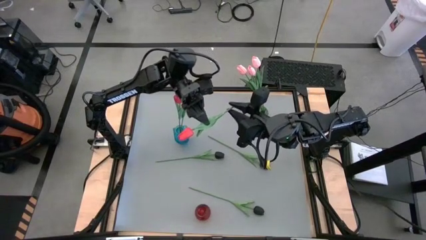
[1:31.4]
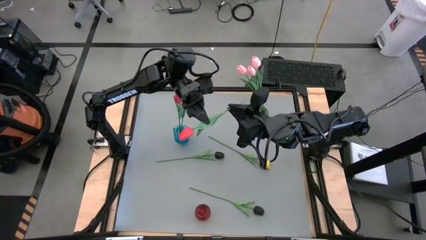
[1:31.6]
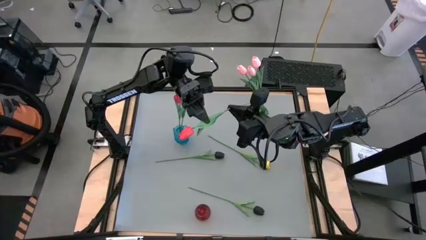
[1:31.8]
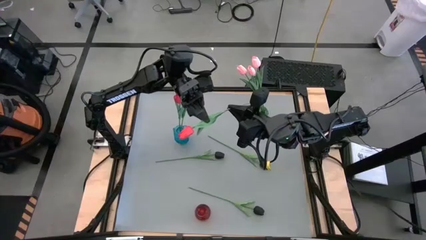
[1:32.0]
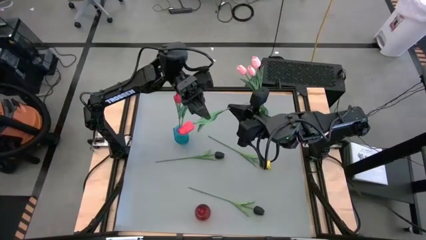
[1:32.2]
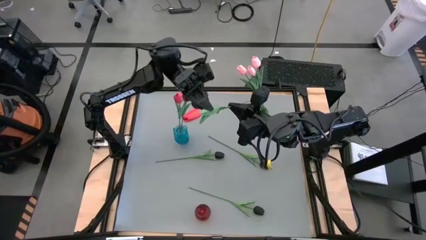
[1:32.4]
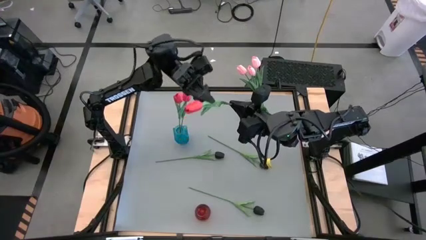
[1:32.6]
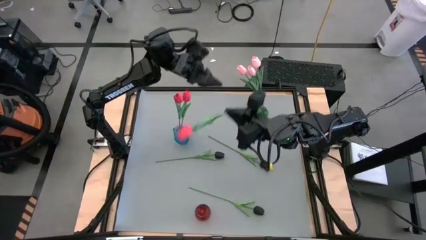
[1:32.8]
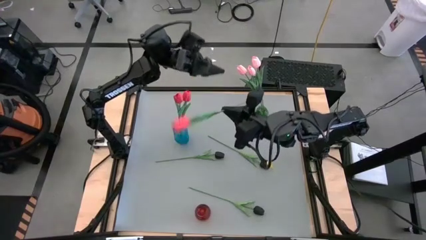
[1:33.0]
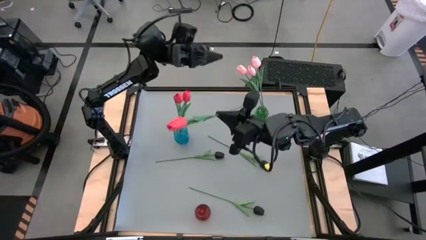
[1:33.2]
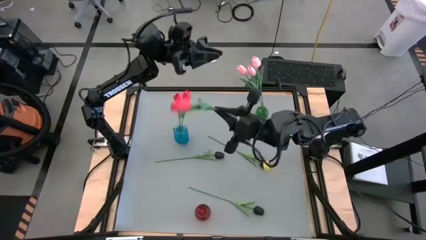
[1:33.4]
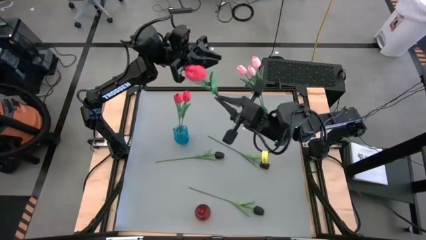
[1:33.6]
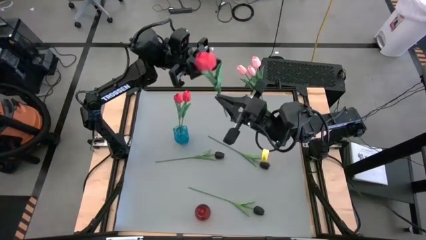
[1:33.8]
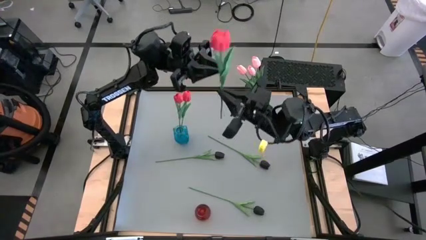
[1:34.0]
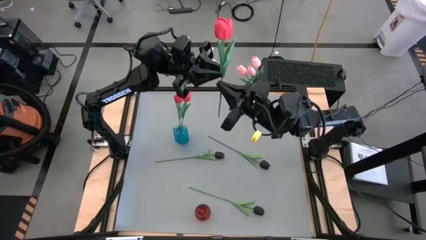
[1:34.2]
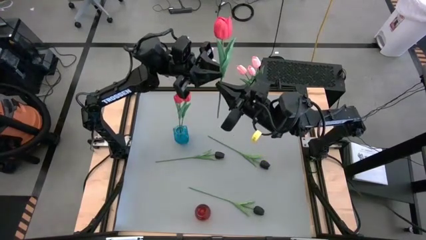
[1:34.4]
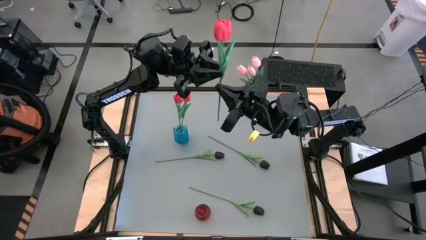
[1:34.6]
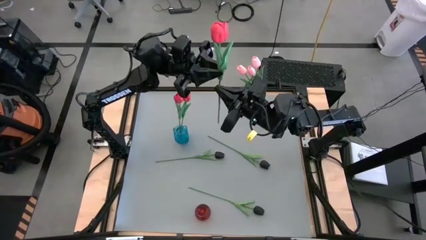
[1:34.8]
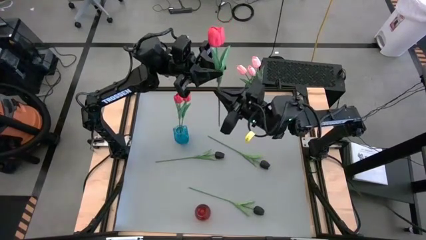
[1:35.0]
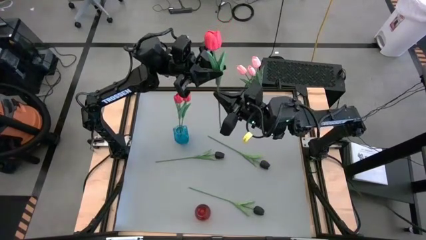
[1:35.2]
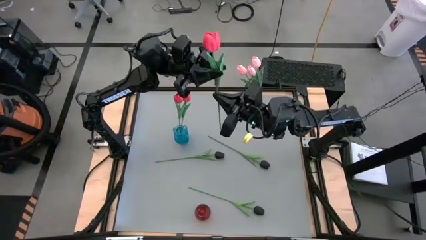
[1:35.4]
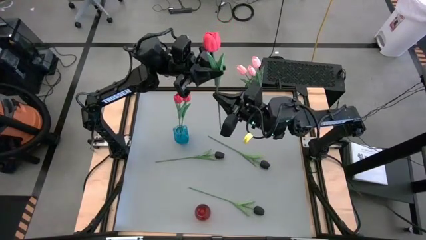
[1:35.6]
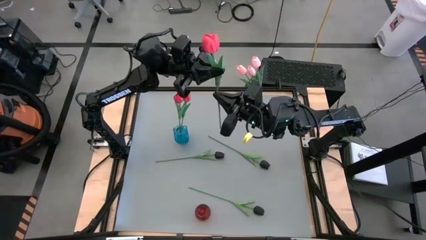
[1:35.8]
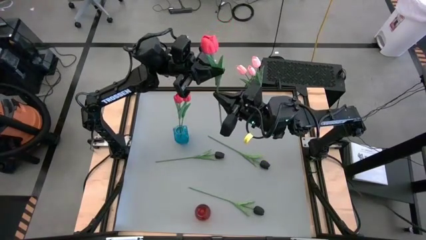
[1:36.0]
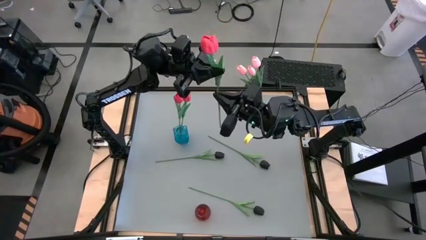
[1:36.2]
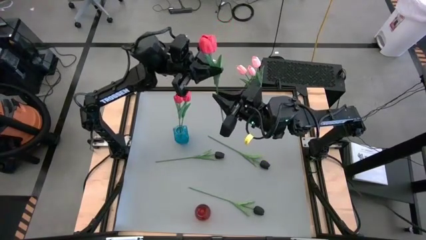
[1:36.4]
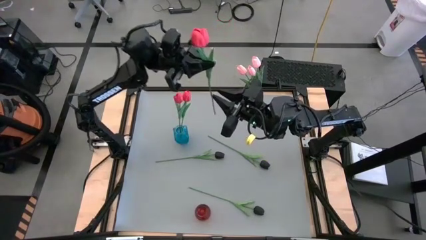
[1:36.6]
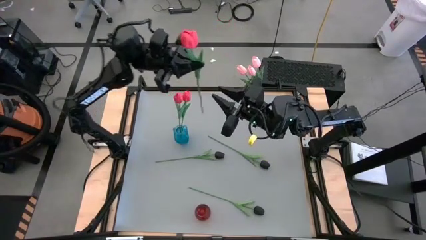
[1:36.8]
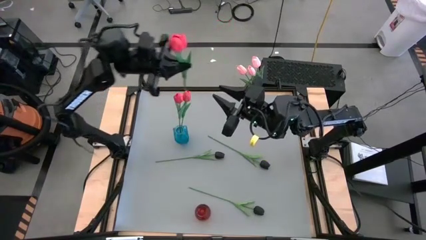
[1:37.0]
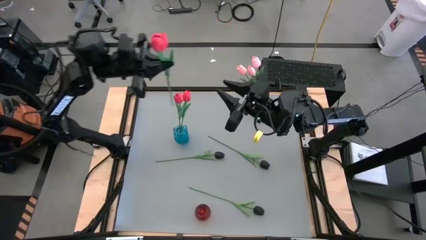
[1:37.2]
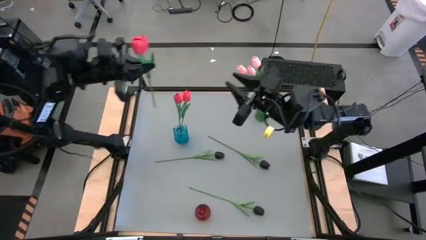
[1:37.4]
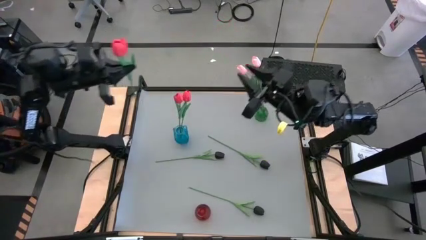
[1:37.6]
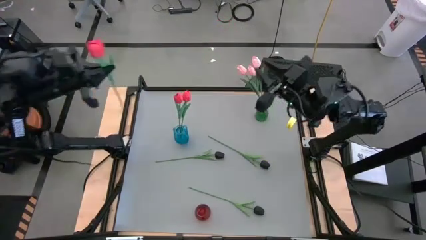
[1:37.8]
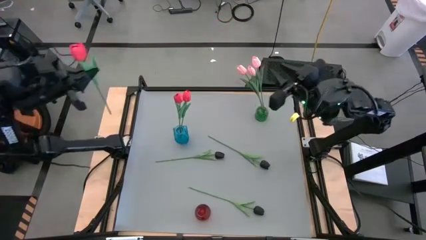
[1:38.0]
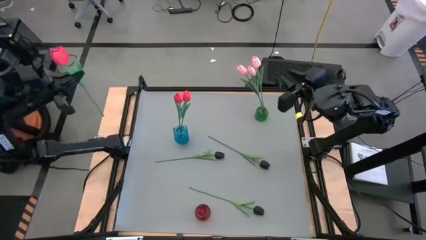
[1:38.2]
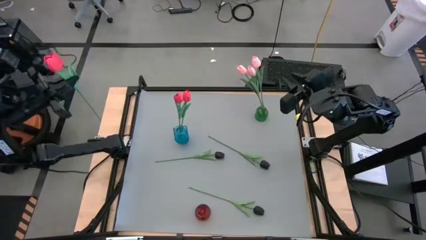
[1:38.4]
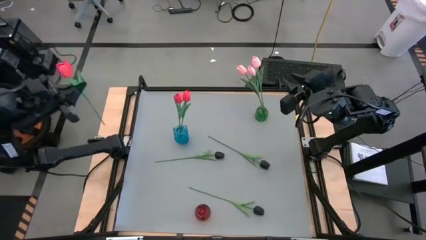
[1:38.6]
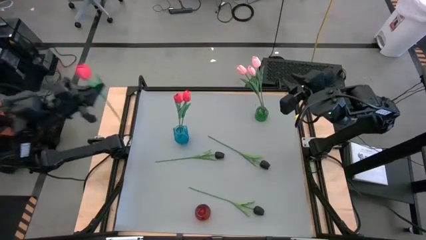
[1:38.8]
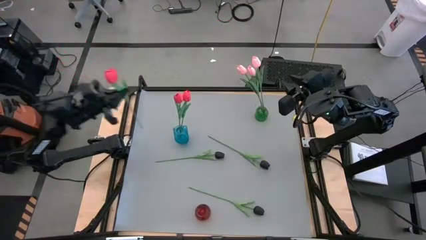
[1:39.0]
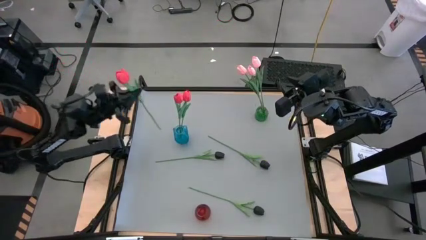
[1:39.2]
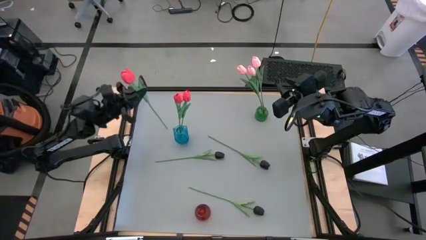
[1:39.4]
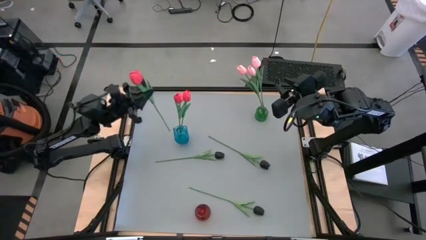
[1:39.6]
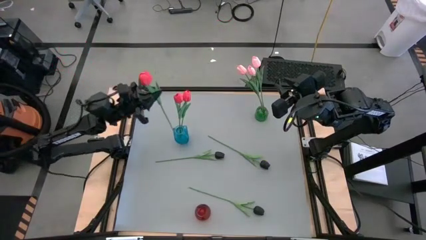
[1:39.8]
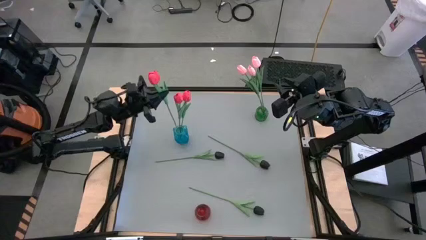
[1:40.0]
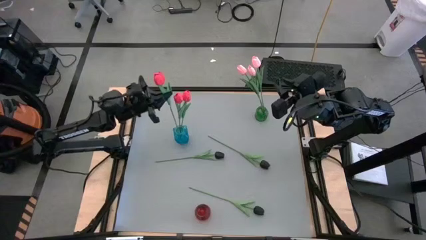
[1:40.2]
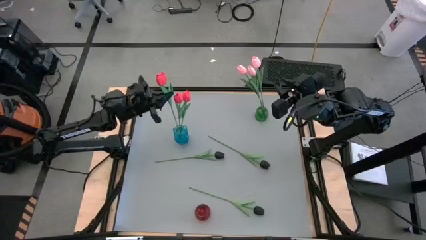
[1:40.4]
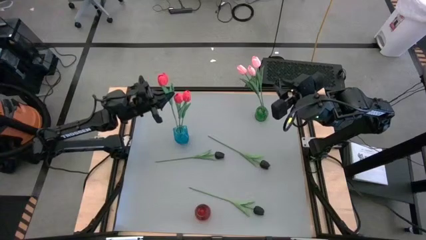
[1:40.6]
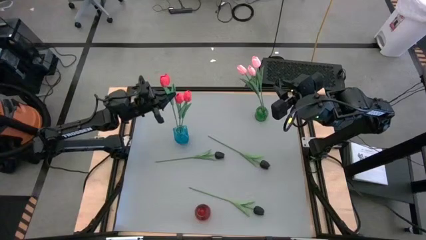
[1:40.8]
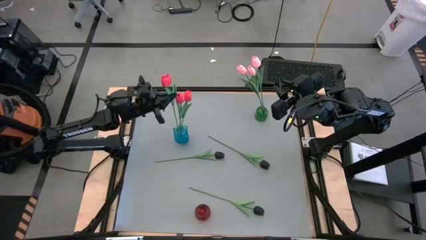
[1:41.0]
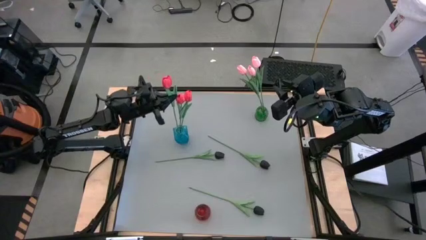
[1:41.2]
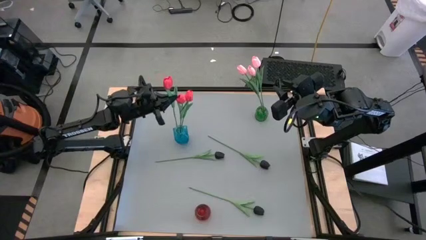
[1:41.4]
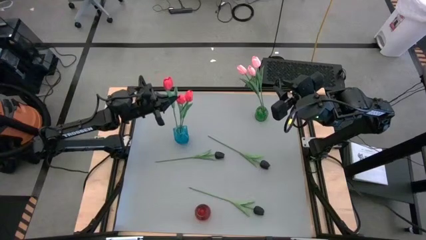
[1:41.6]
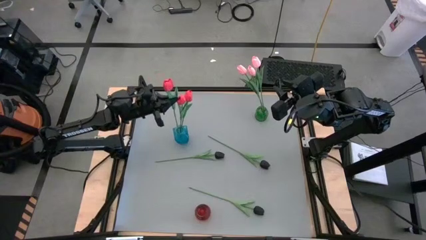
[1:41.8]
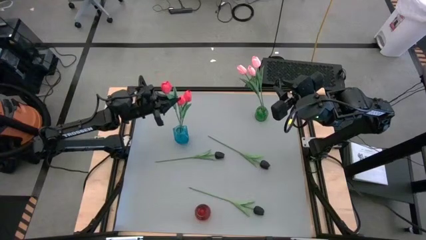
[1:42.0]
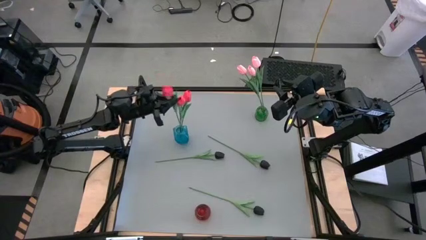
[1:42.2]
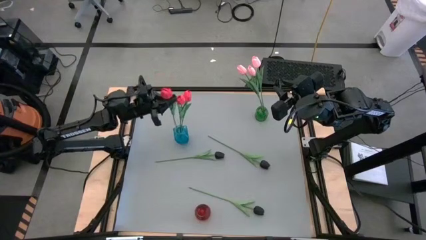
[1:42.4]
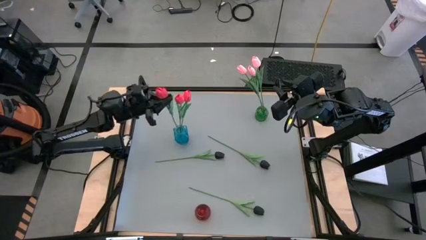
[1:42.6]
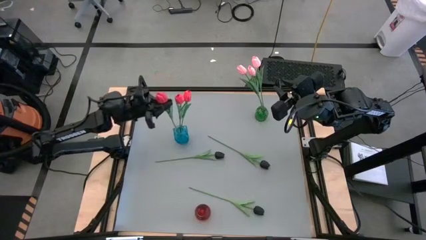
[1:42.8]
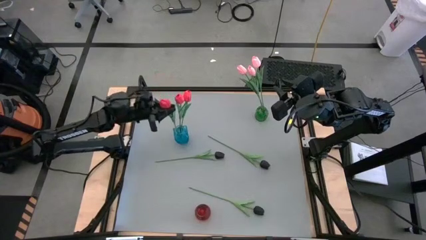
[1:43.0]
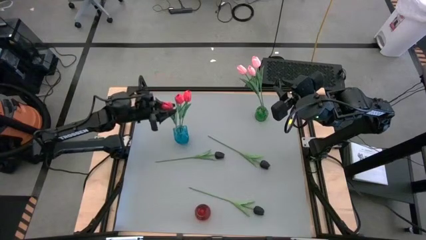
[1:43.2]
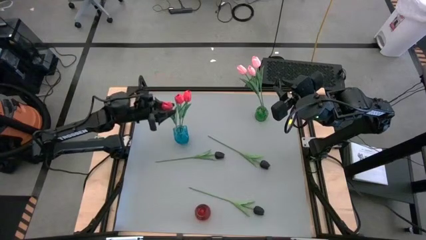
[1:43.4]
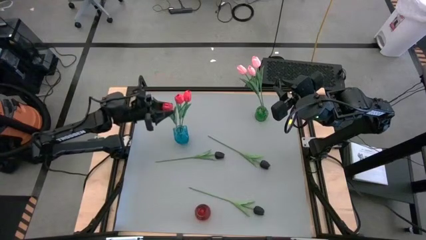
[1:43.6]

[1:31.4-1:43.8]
Task: Sort flowers into vase by color
Put the red flower into the blue vase

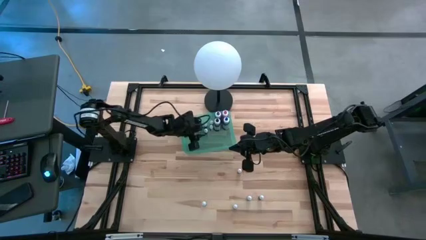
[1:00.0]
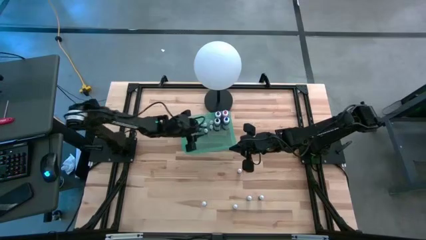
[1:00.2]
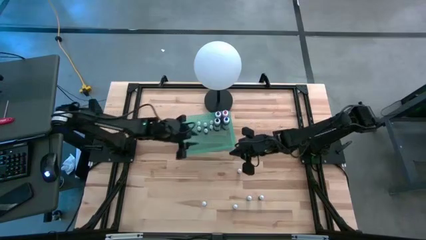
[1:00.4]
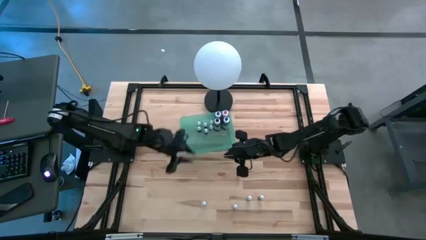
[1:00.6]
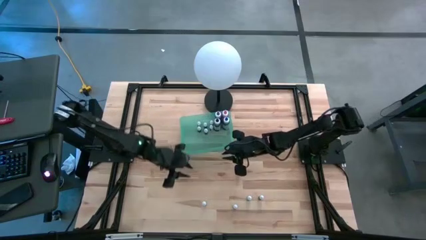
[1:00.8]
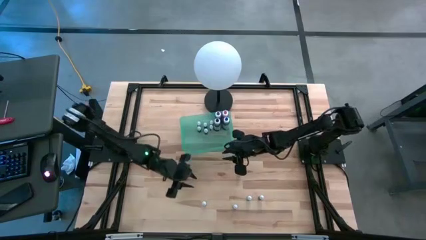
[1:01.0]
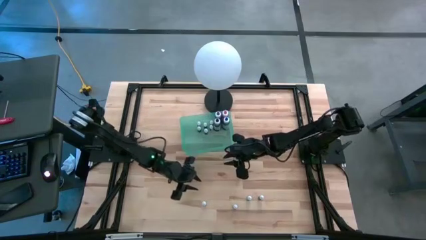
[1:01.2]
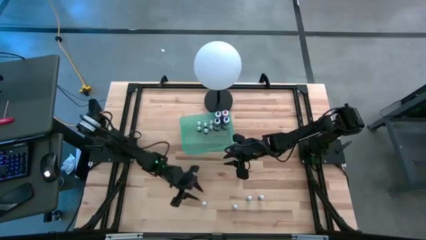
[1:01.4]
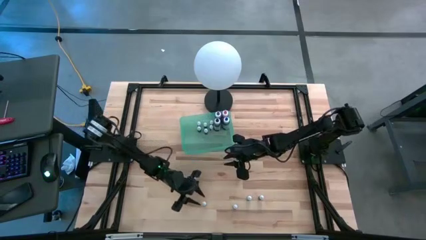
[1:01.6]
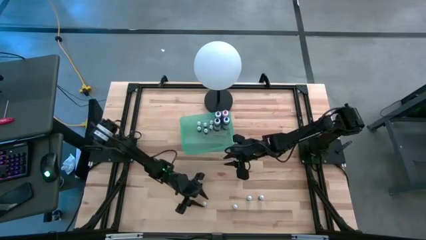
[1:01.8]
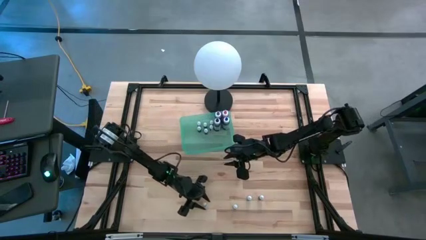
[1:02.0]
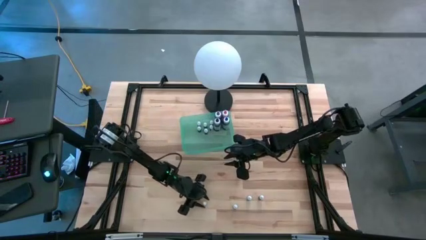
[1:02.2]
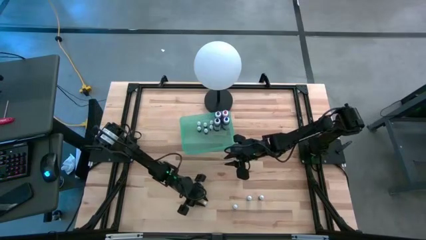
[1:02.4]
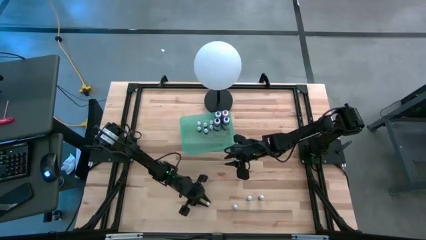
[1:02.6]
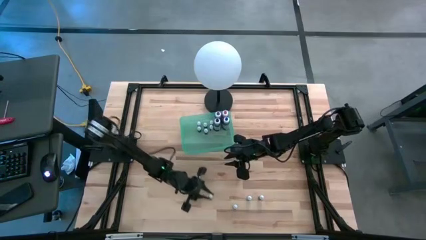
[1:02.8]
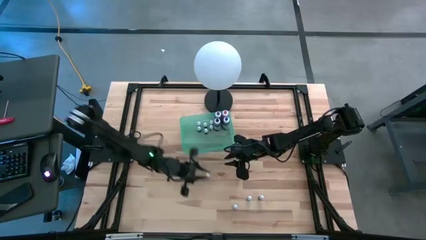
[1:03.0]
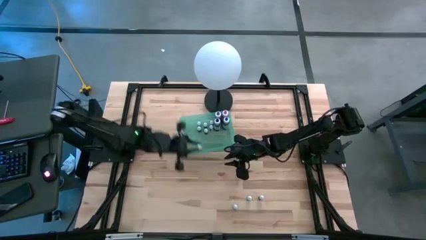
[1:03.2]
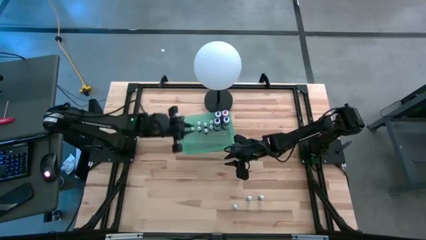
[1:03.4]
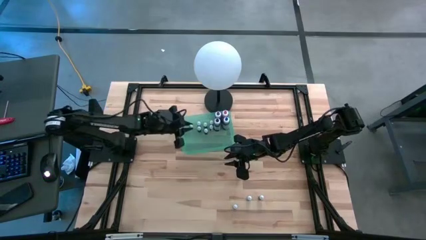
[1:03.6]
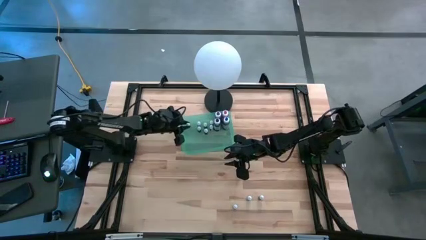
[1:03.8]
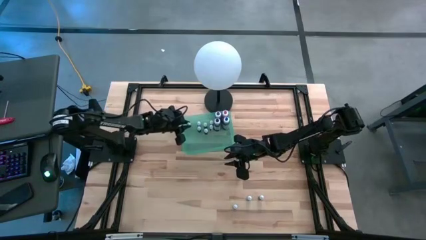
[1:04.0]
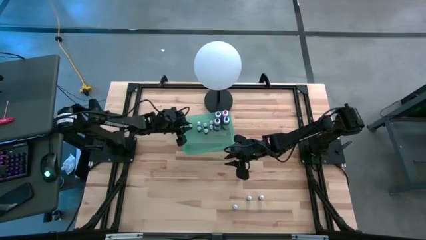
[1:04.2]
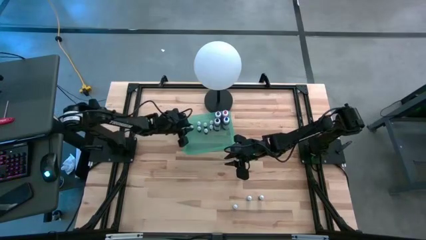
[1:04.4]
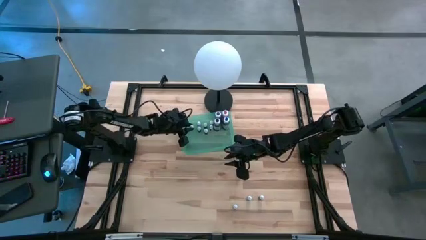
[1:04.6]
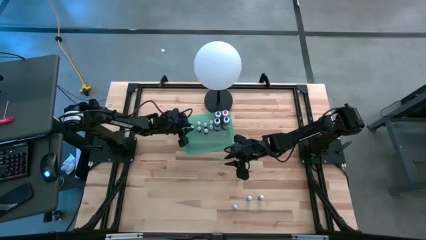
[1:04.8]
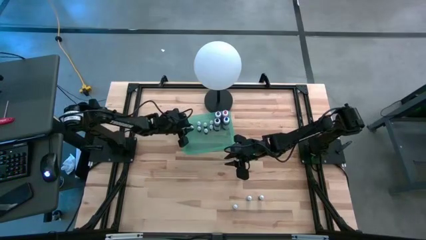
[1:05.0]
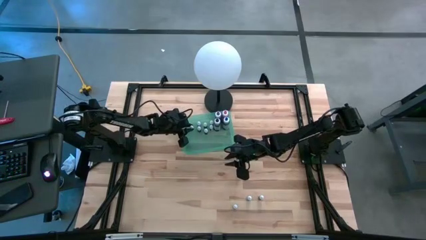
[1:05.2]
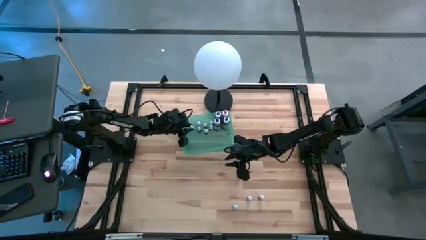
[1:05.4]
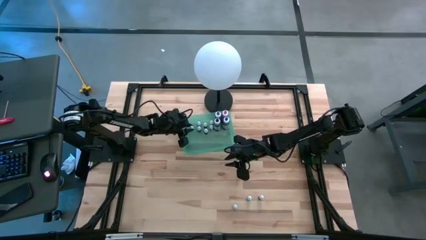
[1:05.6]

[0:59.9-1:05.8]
Task: Pick & Place food coloring
Put the small blue food coloring bottle into the green bin
